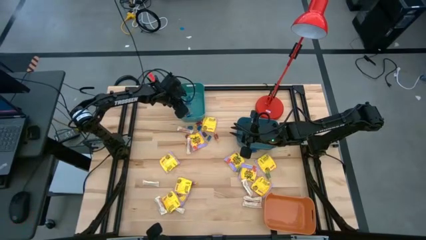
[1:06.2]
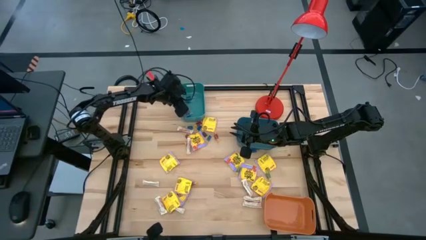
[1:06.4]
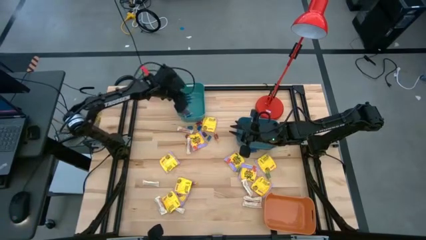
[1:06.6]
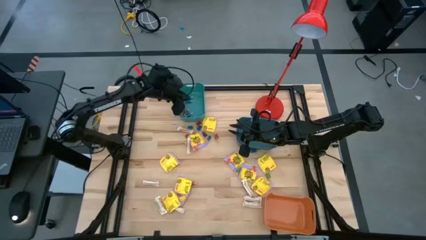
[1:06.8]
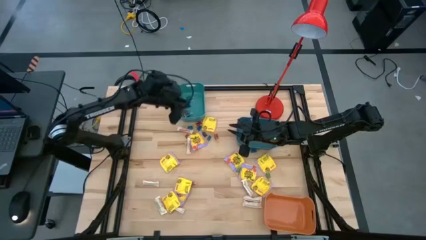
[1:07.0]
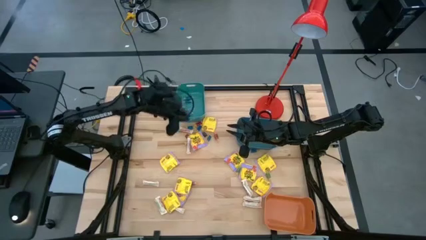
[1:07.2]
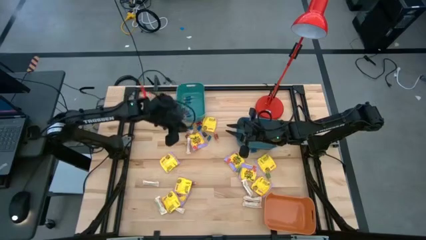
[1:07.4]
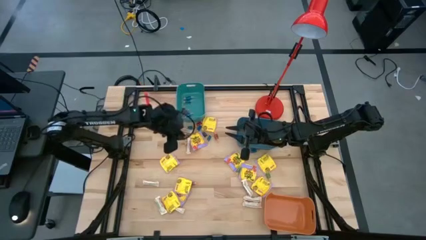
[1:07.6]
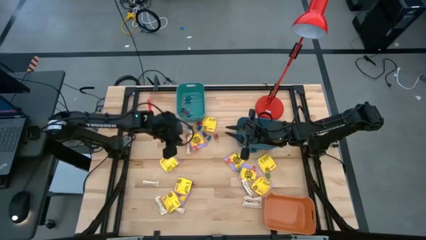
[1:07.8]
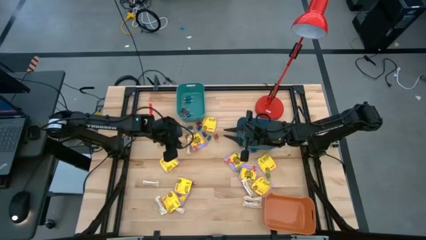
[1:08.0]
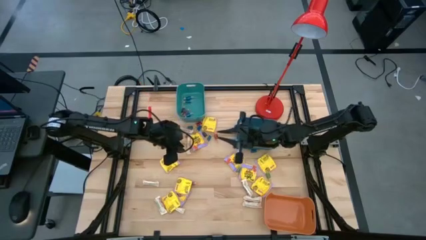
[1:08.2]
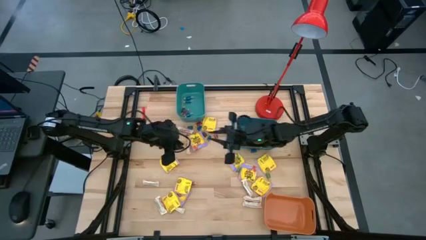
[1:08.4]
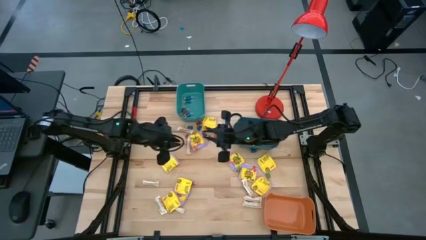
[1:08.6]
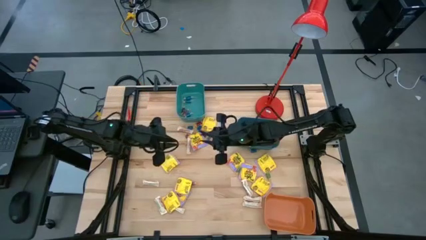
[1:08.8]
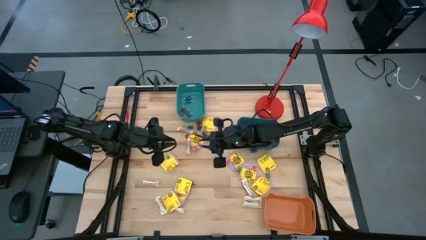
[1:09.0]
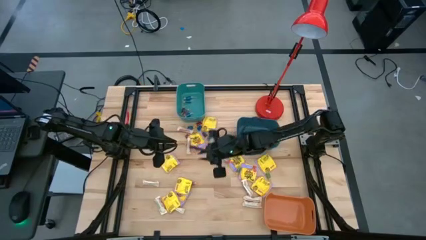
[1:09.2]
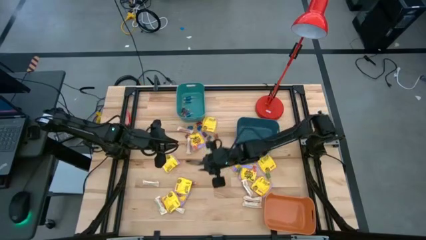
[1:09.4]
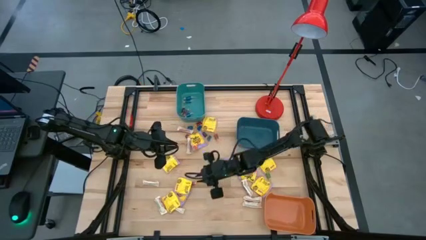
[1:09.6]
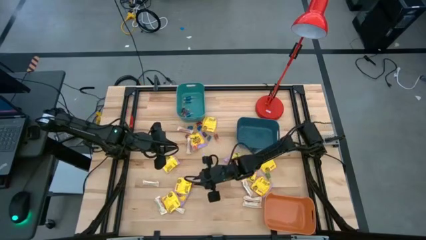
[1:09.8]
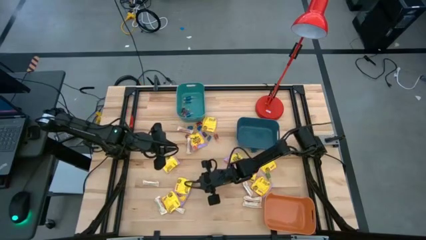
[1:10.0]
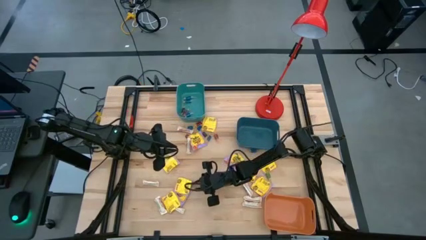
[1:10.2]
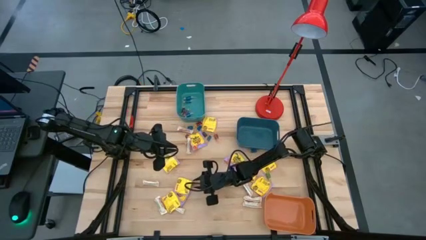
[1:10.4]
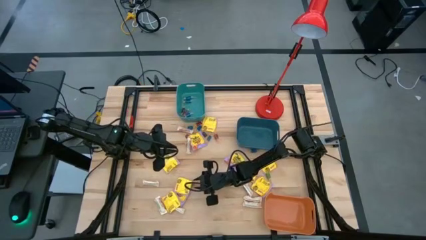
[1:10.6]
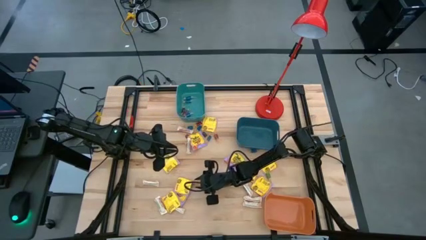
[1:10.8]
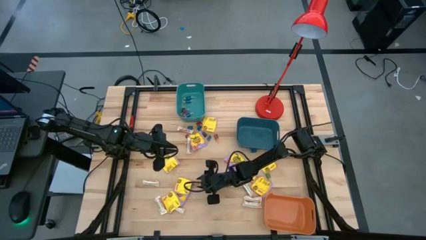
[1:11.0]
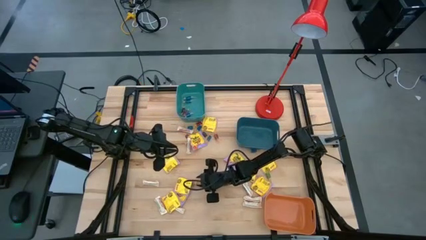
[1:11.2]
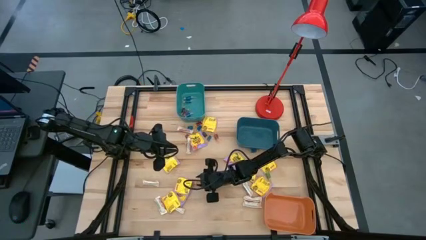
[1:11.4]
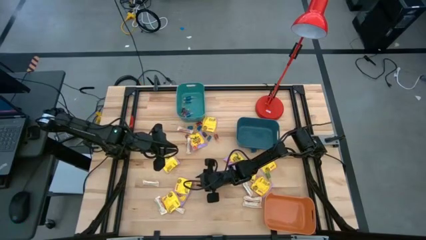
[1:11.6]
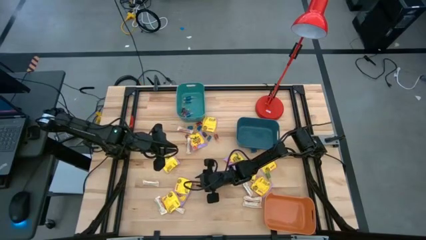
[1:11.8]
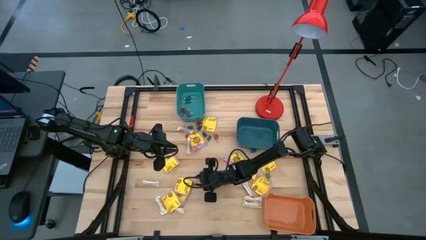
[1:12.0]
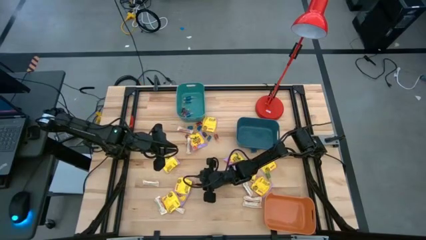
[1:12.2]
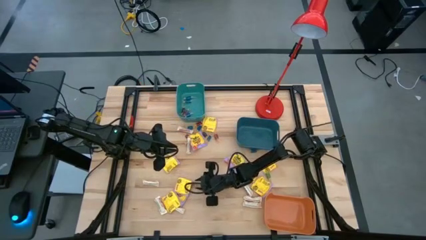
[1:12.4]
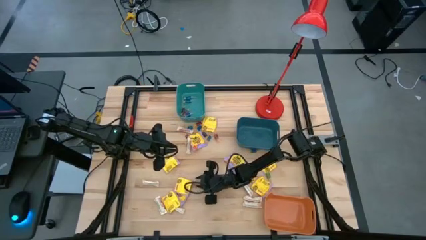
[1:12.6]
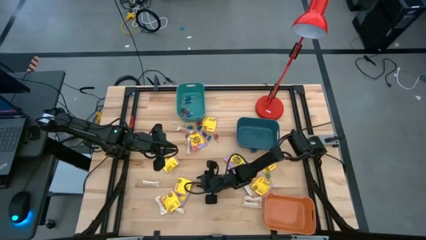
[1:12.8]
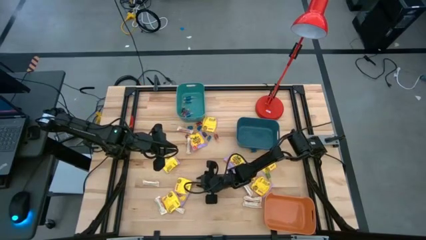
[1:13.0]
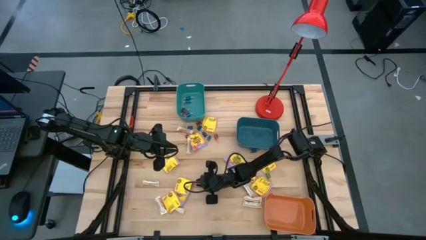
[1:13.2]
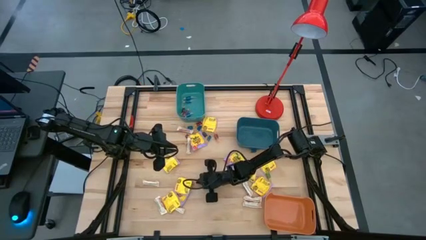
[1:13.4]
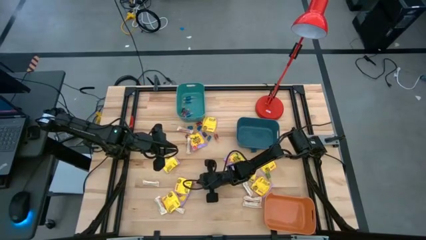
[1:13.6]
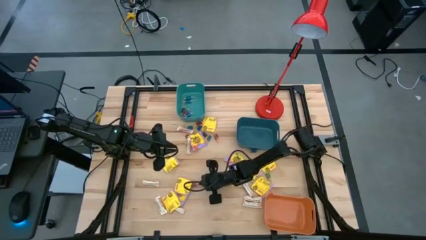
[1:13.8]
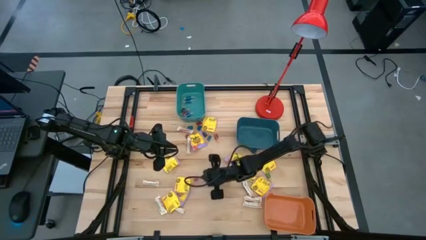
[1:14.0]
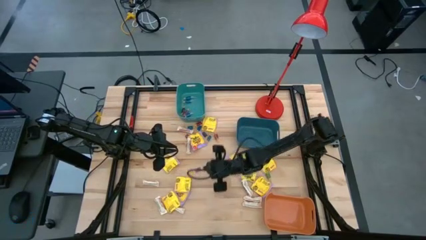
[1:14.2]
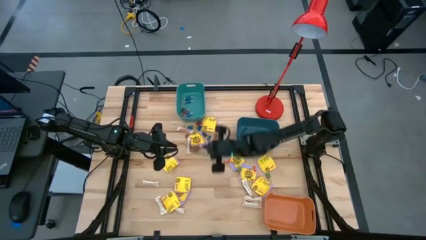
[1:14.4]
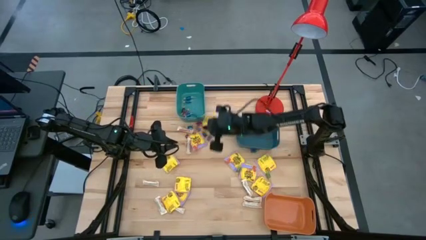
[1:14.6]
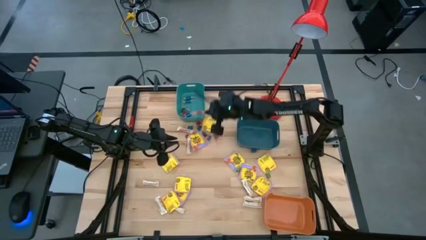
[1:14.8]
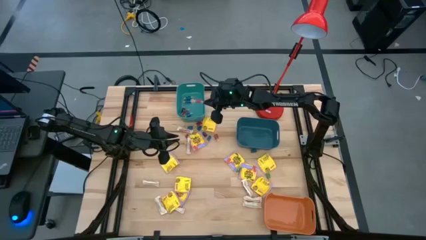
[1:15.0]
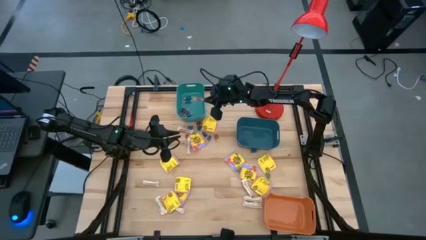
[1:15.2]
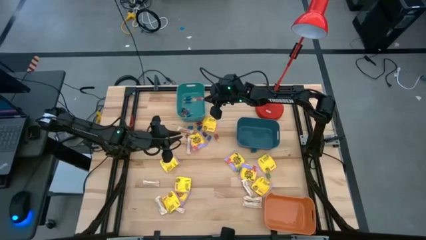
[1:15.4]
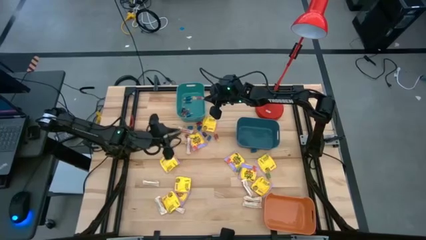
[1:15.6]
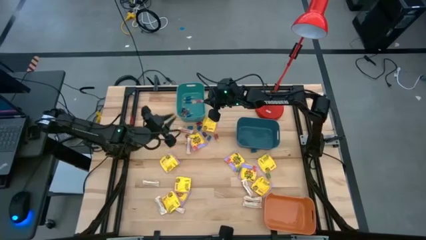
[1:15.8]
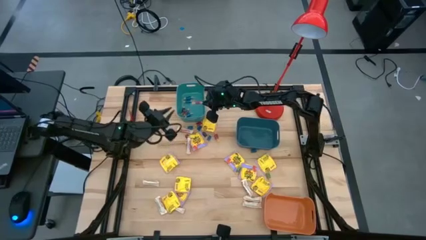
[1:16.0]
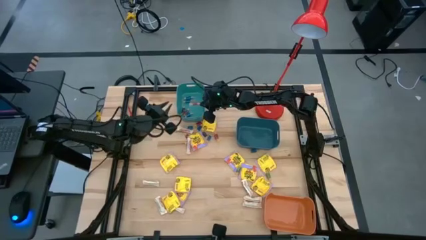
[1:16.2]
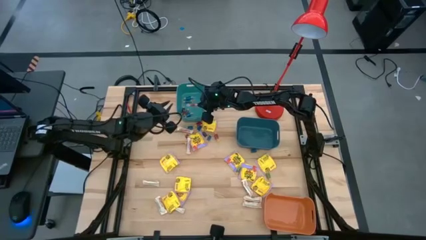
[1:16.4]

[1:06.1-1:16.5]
Task: Sort candy
Put the red candy into the green bin
